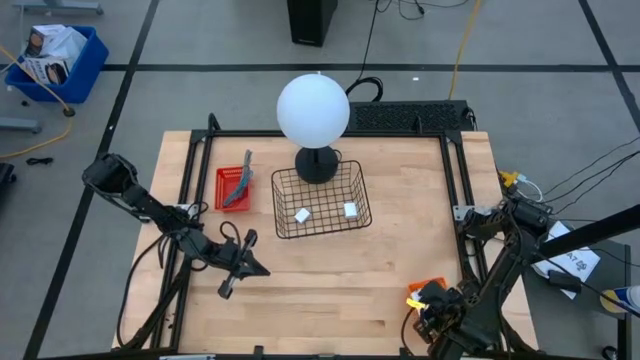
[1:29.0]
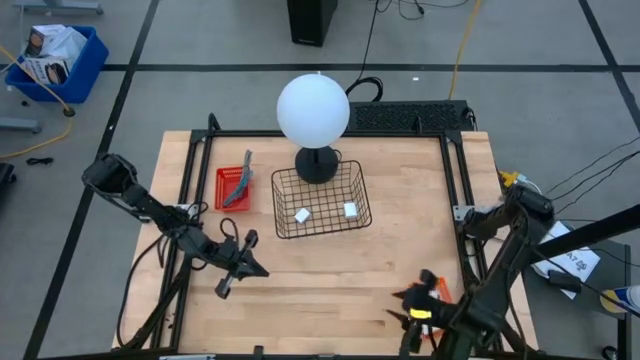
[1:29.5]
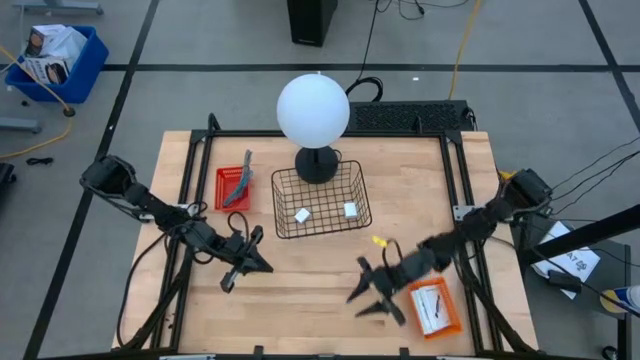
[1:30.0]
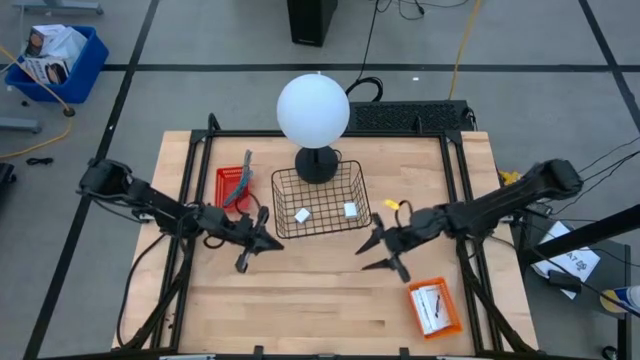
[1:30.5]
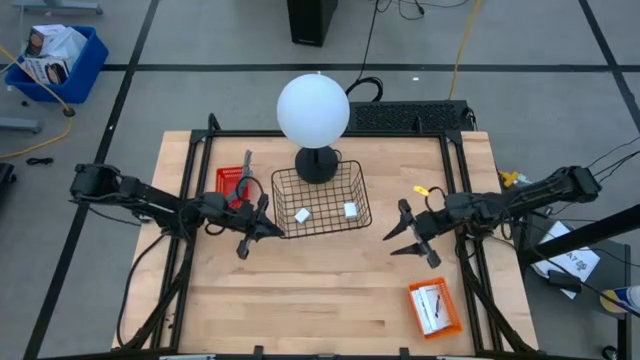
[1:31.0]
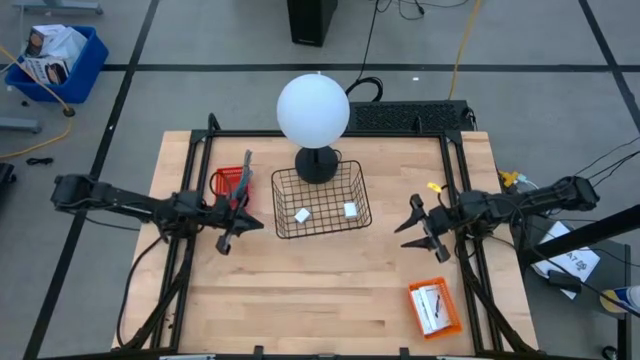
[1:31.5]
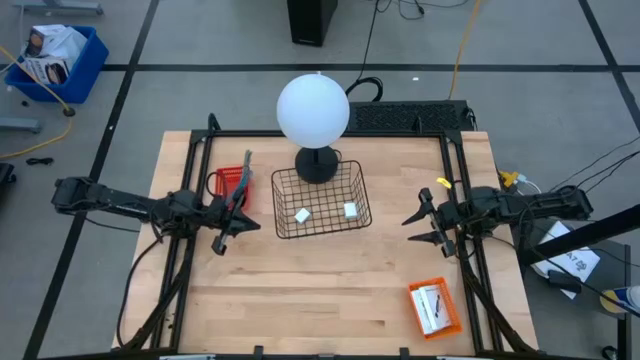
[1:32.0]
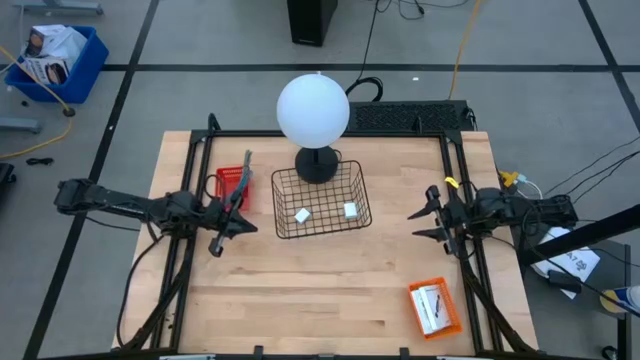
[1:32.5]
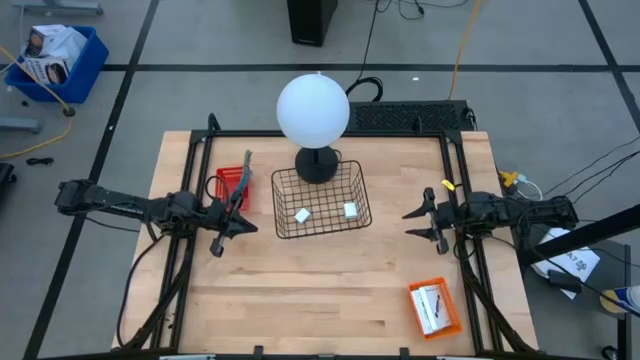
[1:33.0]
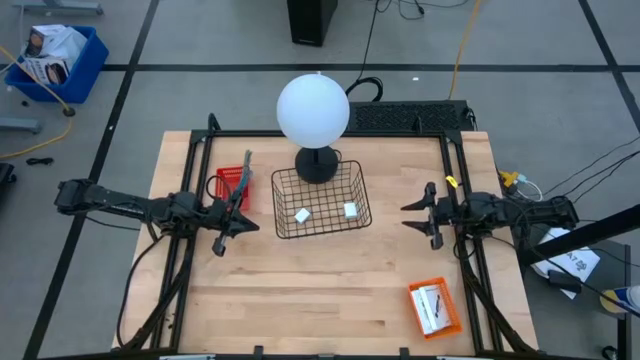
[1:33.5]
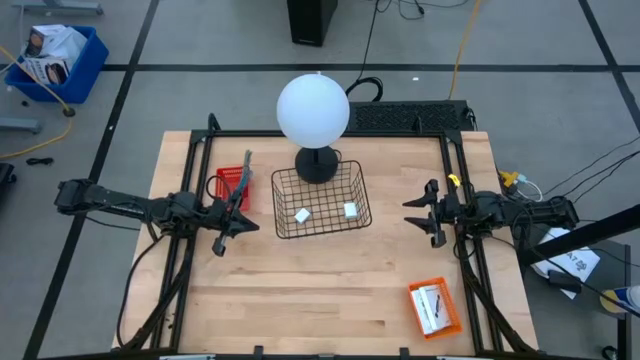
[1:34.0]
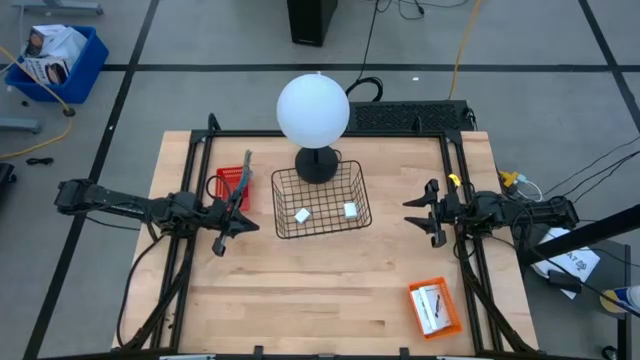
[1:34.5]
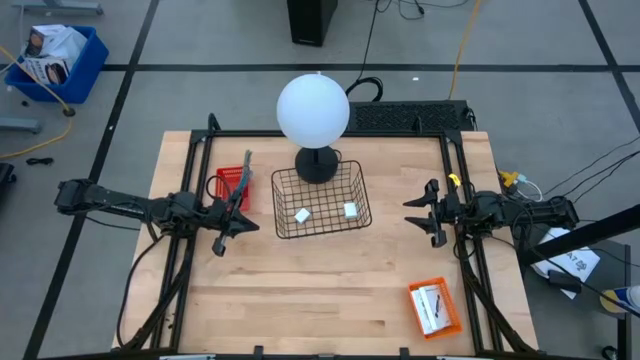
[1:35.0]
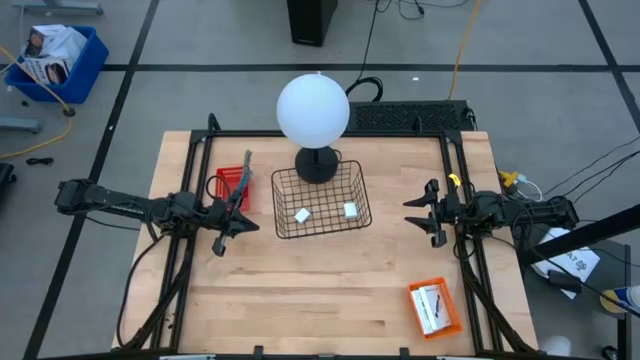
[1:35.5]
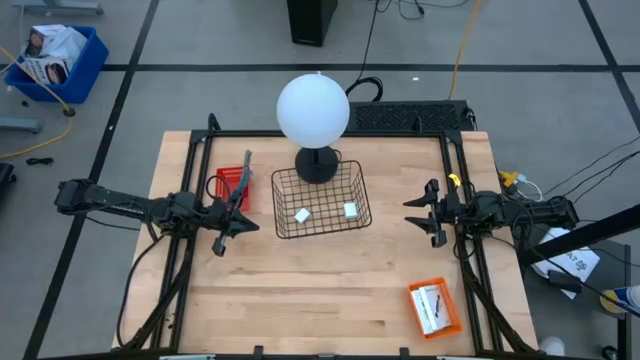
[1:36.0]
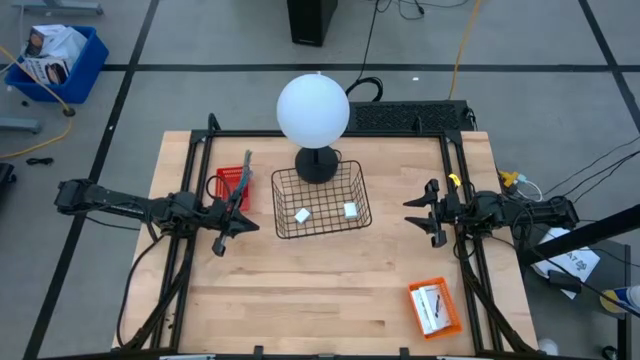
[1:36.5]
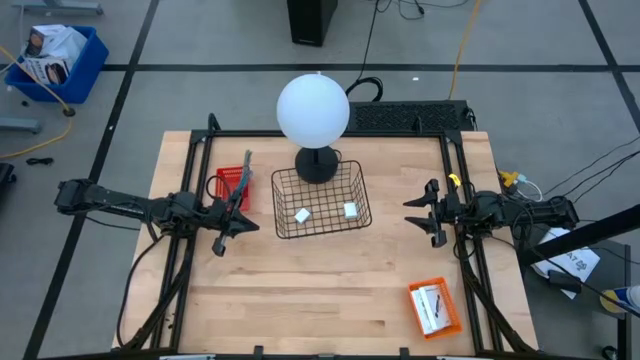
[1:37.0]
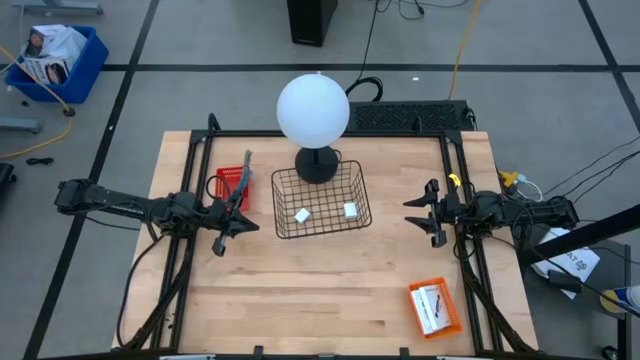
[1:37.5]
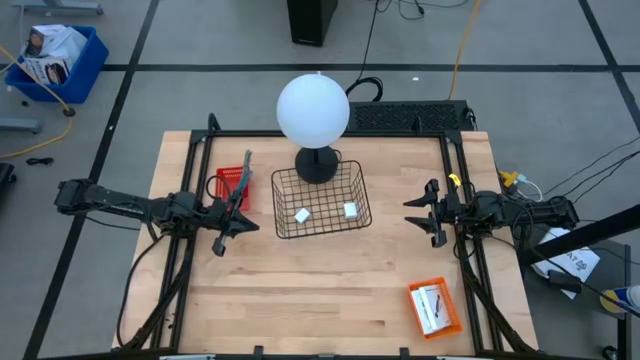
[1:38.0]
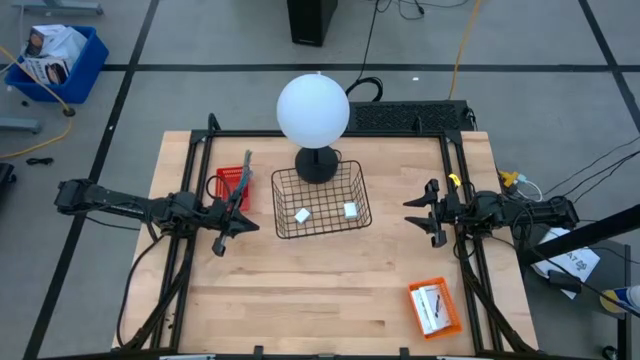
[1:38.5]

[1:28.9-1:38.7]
Task: Pick and place items into bin
Return to Home Position

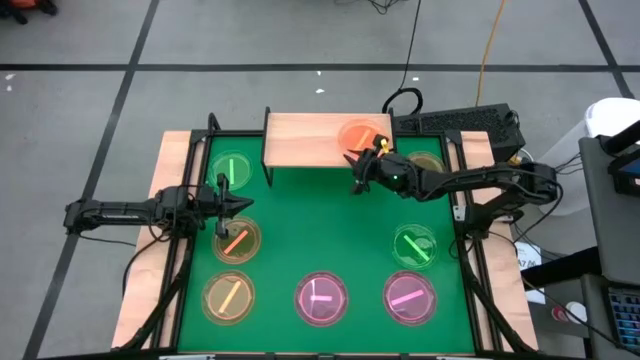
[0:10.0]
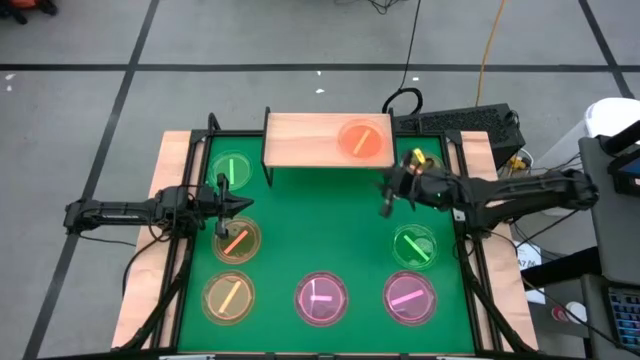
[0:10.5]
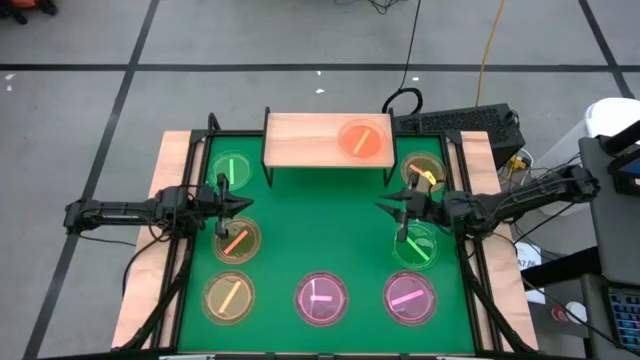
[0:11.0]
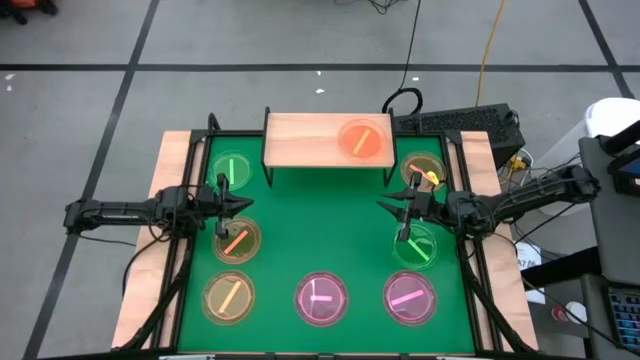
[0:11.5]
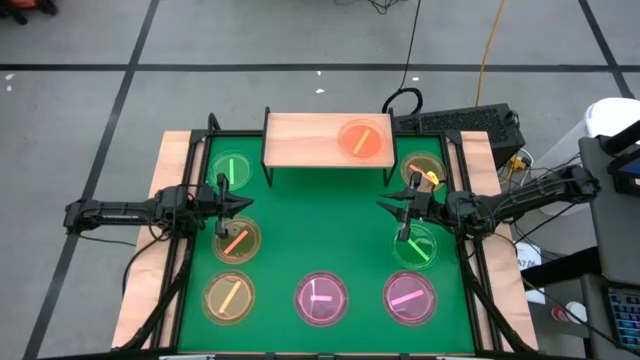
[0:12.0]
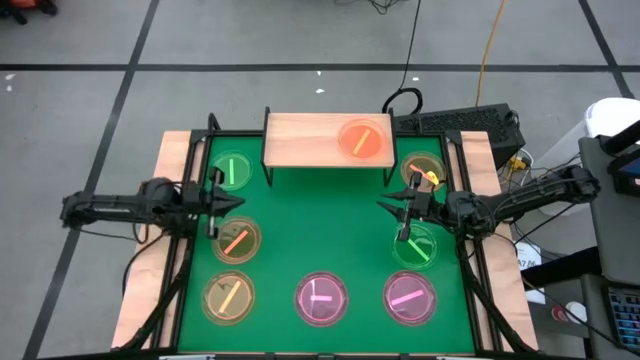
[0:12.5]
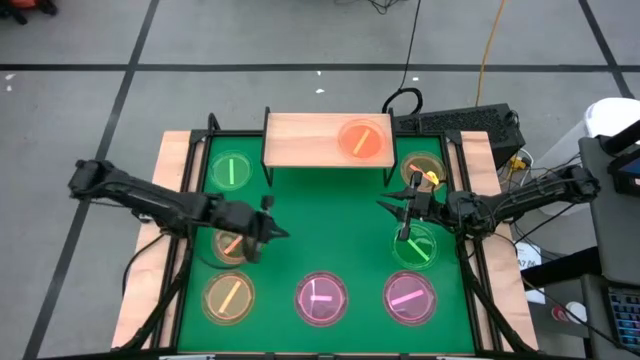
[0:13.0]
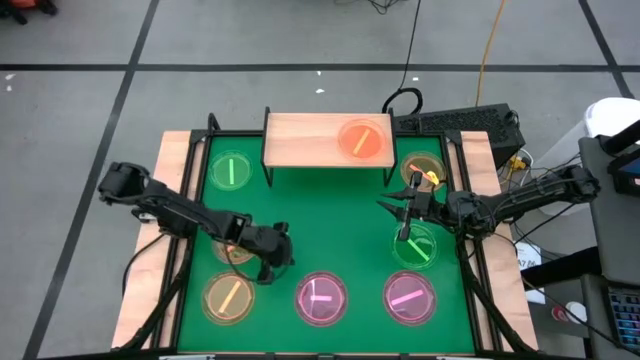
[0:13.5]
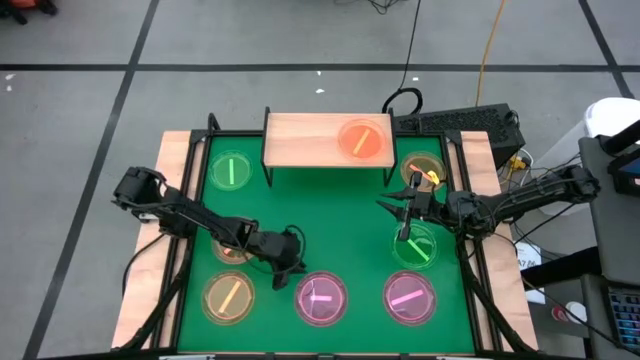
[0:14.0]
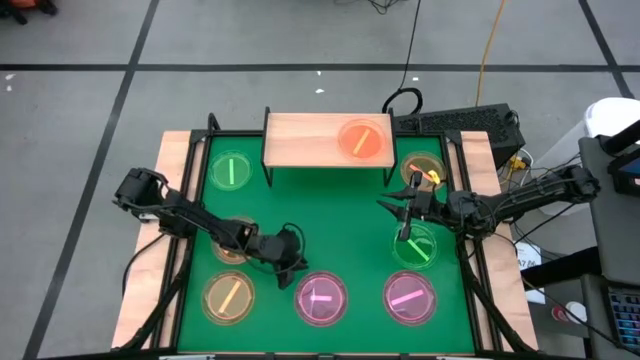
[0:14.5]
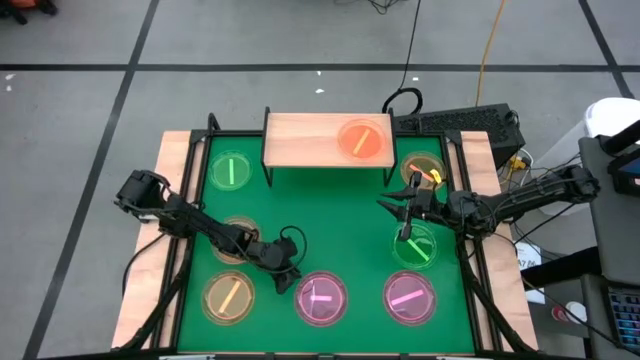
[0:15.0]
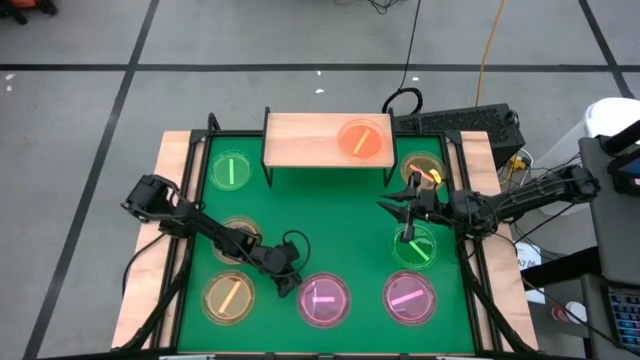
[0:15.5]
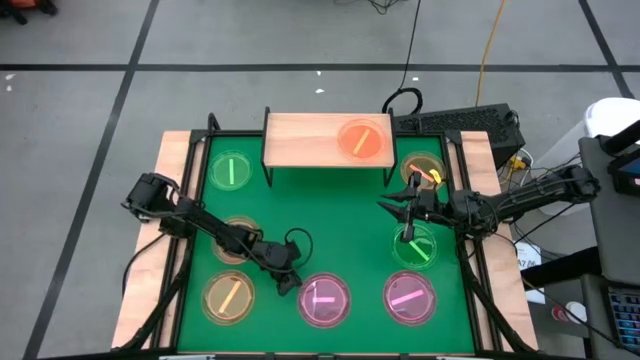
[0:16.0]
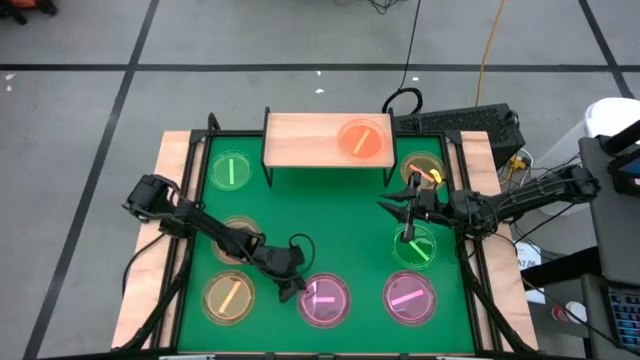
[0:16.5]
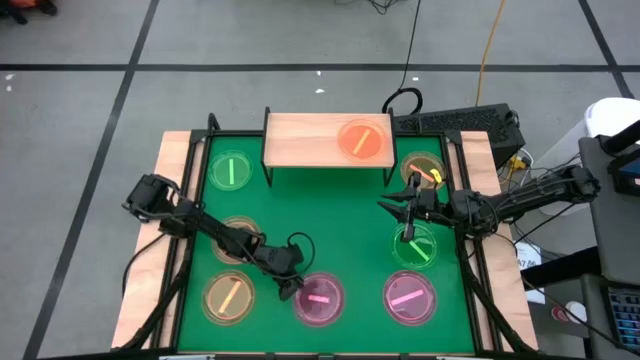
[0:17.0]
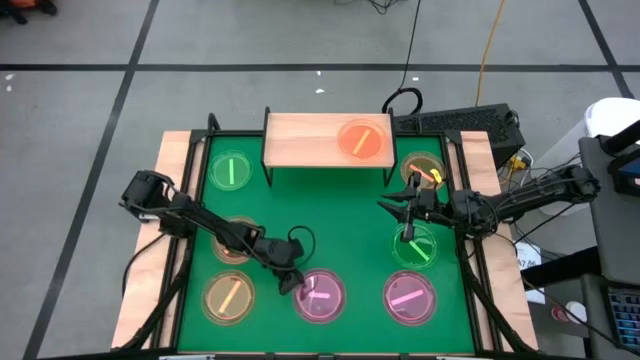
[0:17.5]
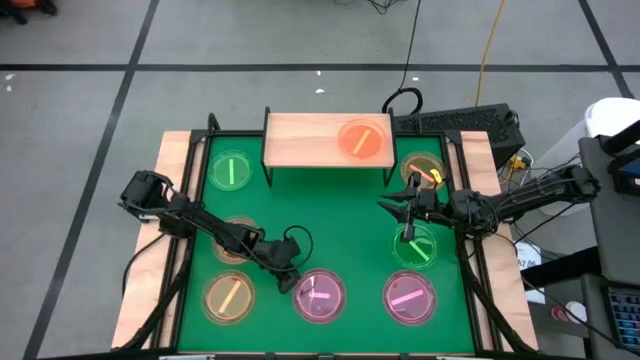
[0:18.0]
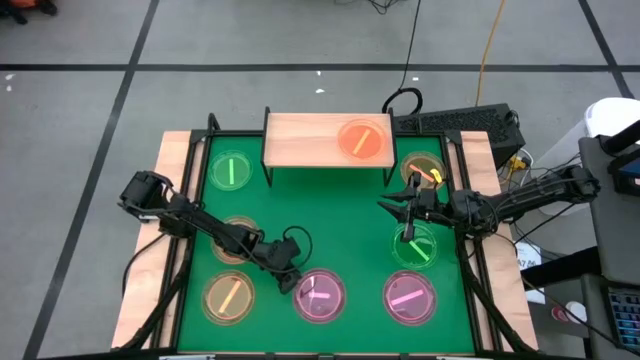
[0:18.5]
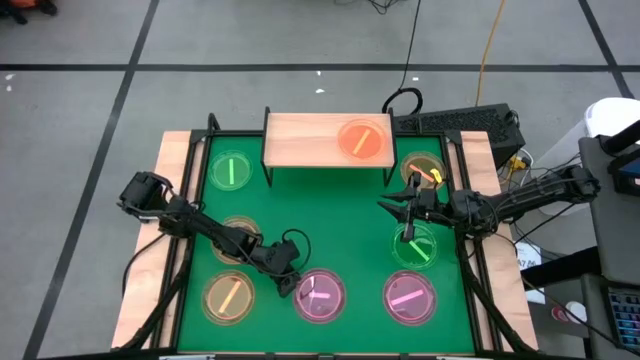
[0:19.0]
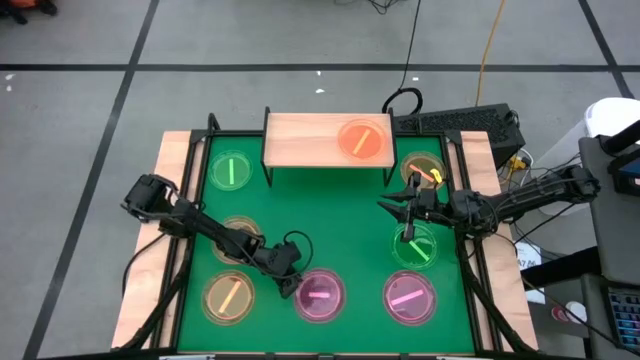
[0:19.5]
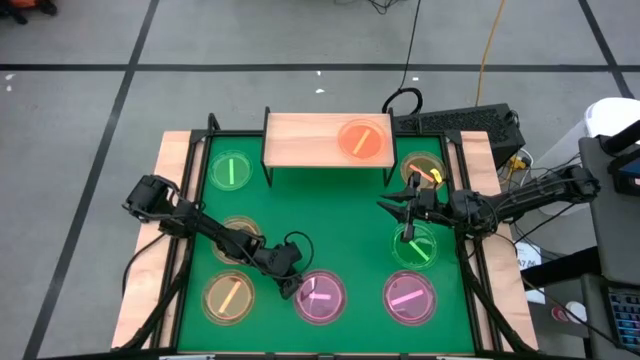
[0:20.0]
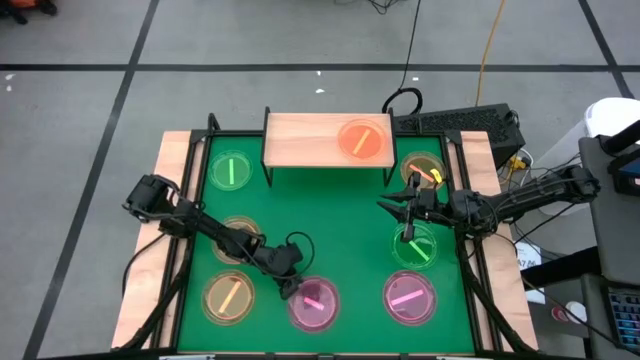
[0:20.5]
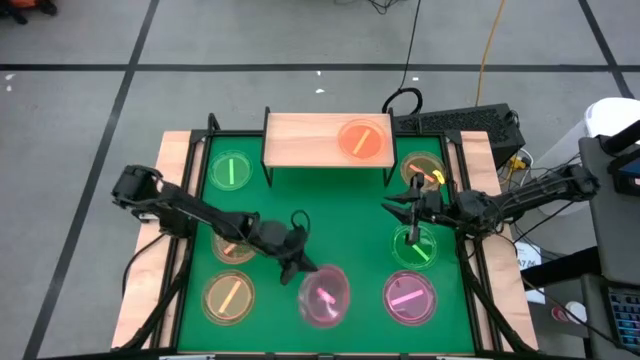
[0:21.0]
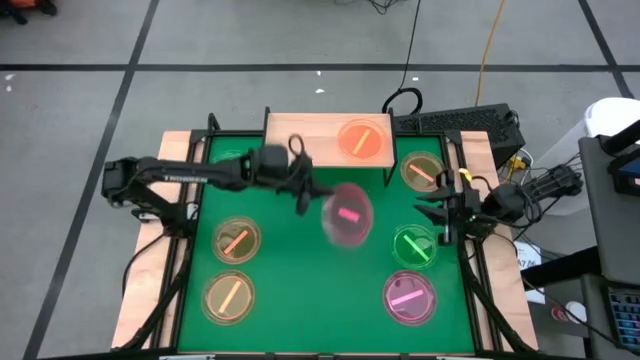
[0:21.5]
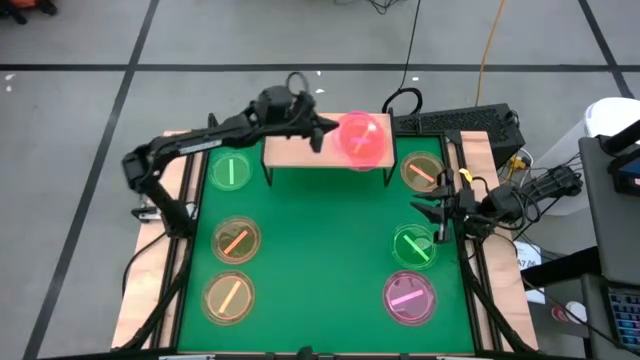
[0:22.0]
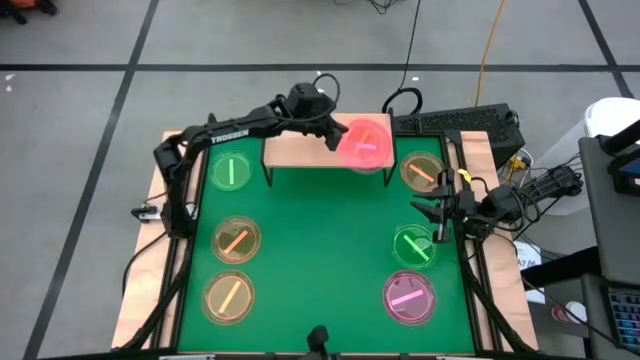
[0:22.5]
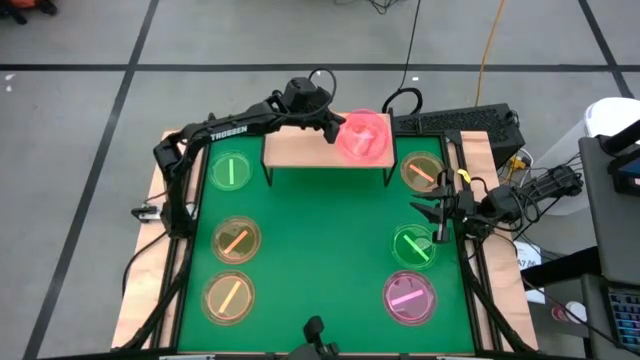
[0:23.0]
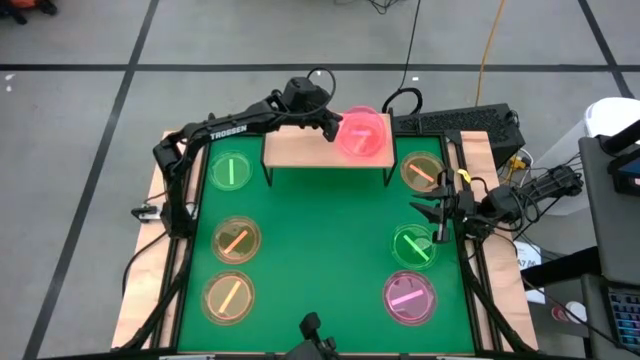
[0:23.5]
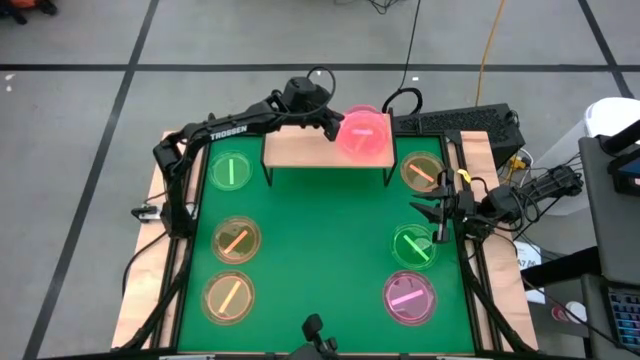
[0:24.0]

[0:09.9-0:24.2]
Task: Place and stack plates onto a shelf
Stack the pink plate on top of the orange plate on the shelf
